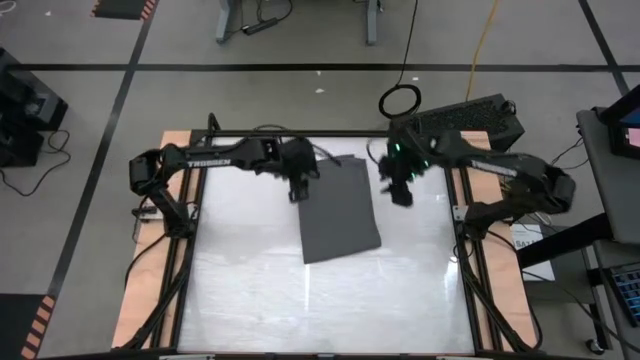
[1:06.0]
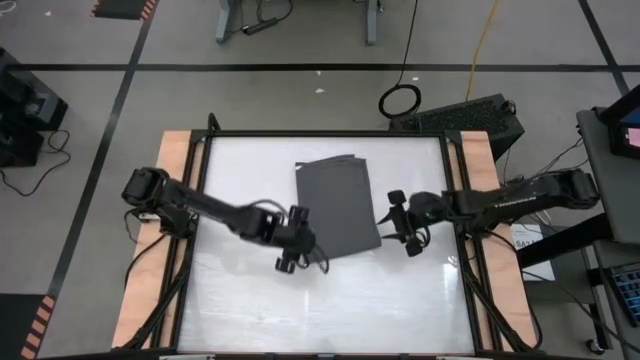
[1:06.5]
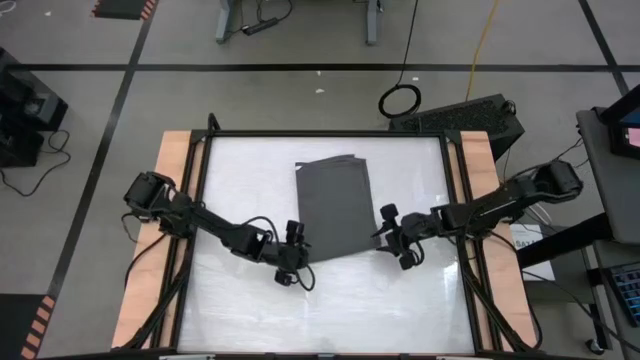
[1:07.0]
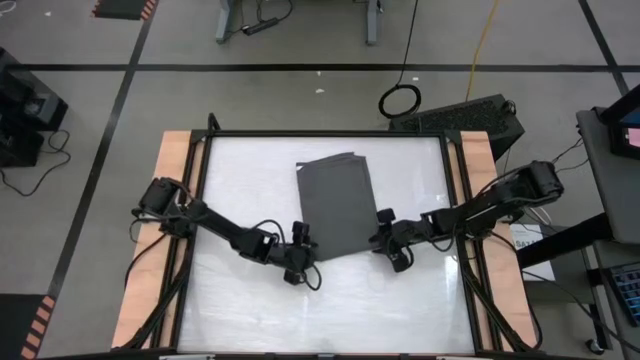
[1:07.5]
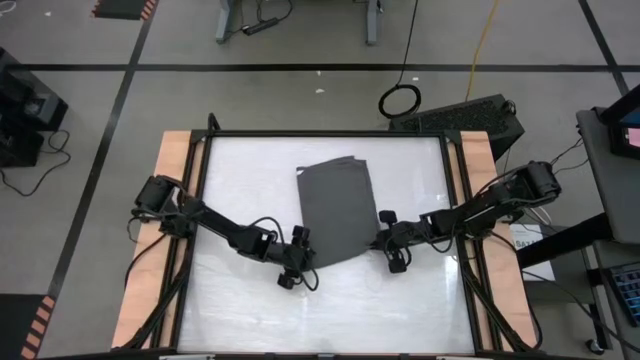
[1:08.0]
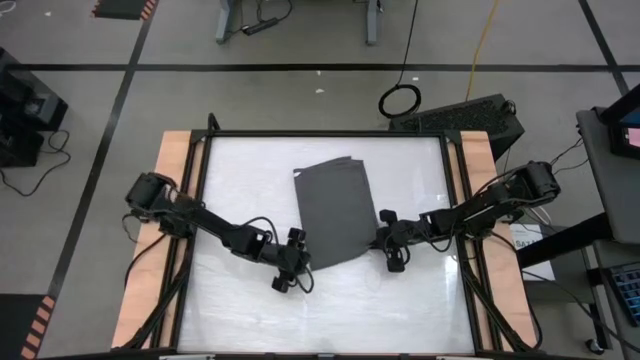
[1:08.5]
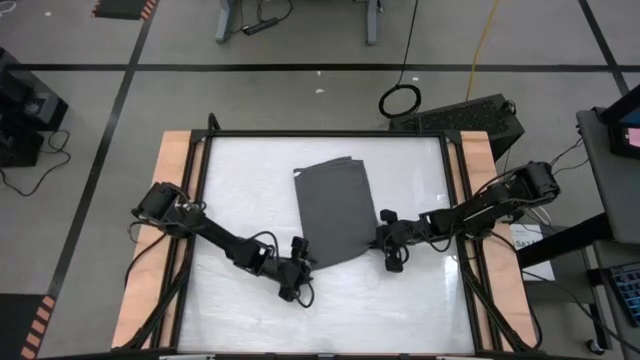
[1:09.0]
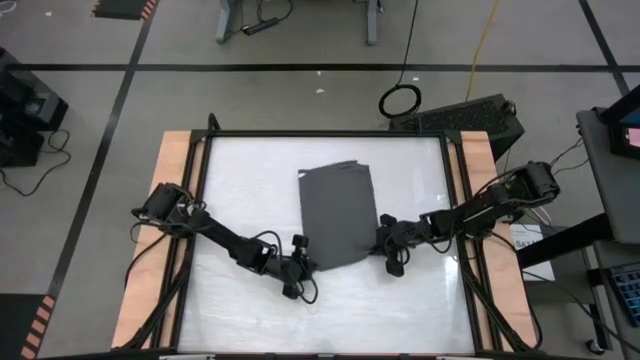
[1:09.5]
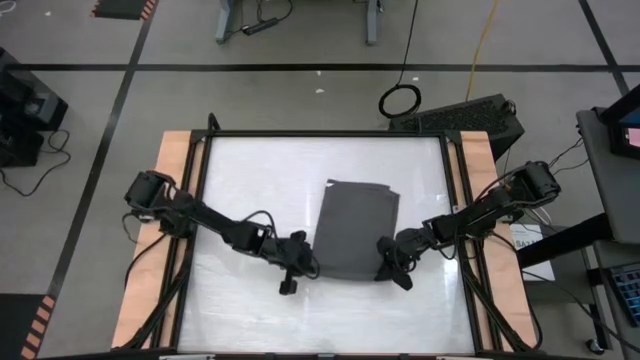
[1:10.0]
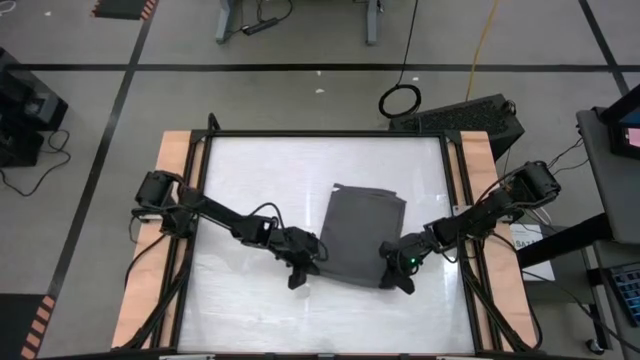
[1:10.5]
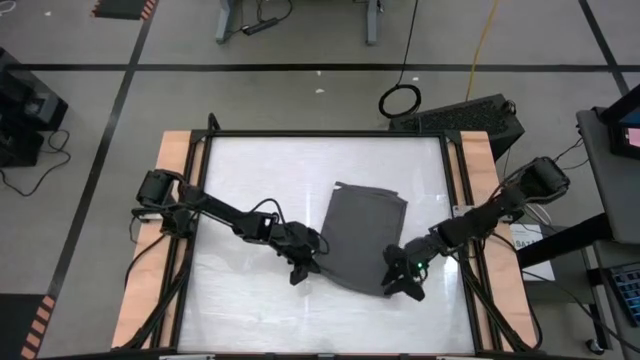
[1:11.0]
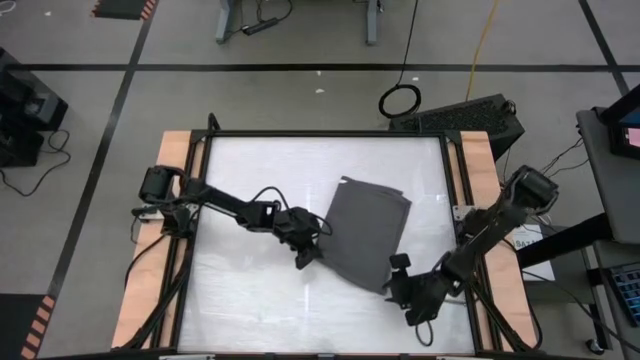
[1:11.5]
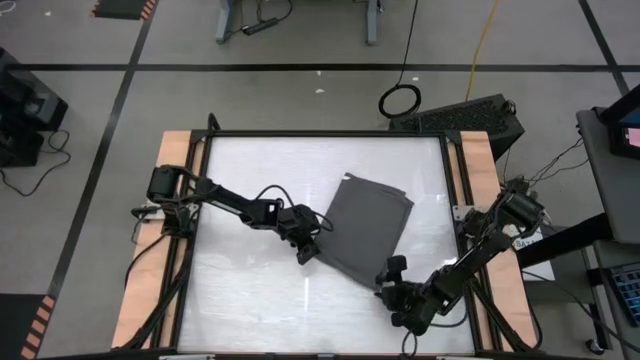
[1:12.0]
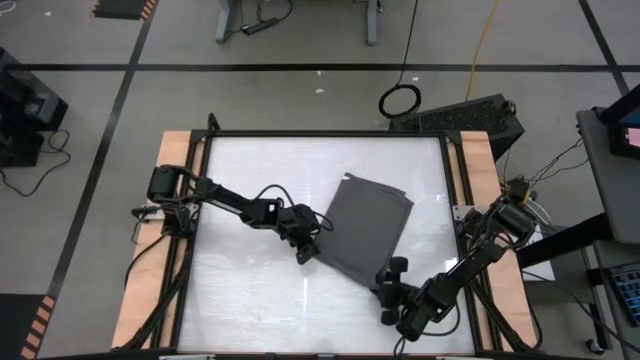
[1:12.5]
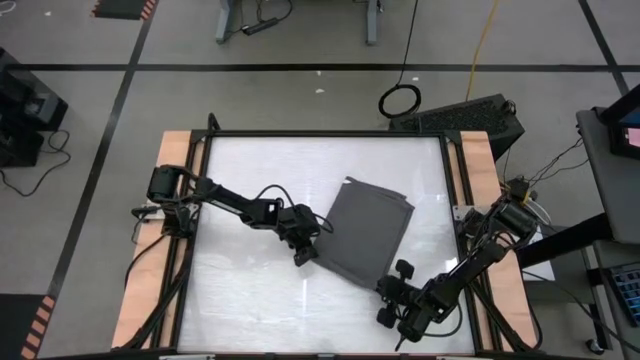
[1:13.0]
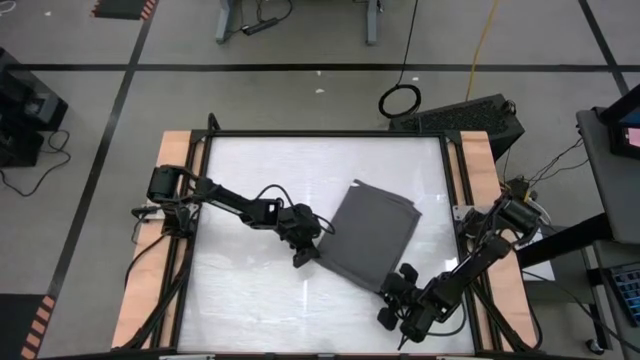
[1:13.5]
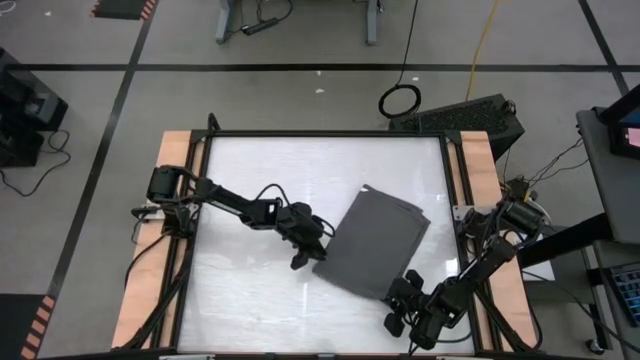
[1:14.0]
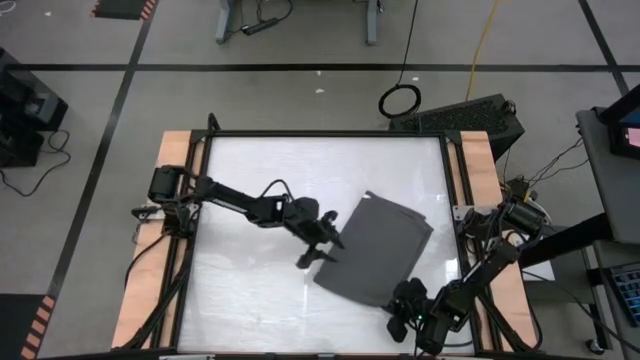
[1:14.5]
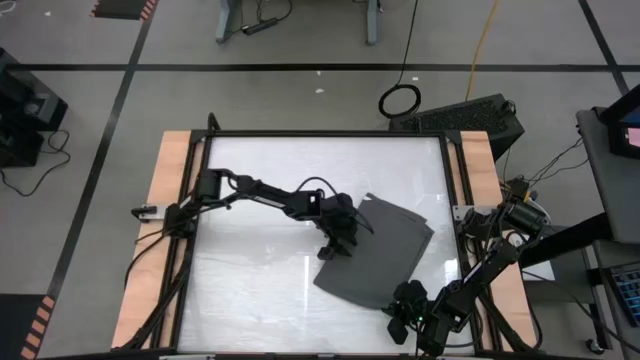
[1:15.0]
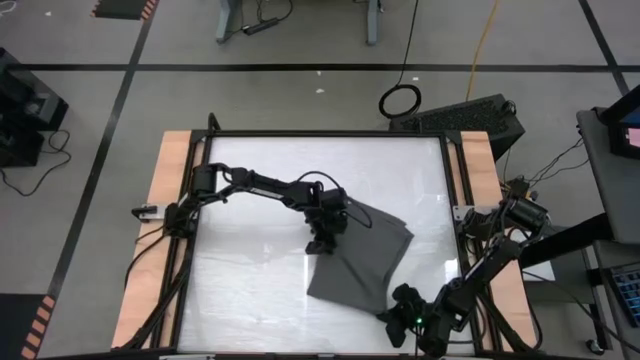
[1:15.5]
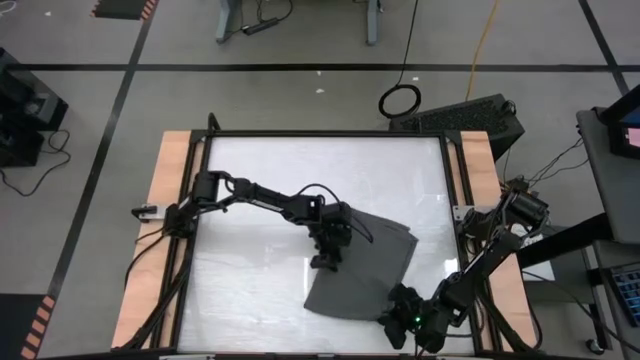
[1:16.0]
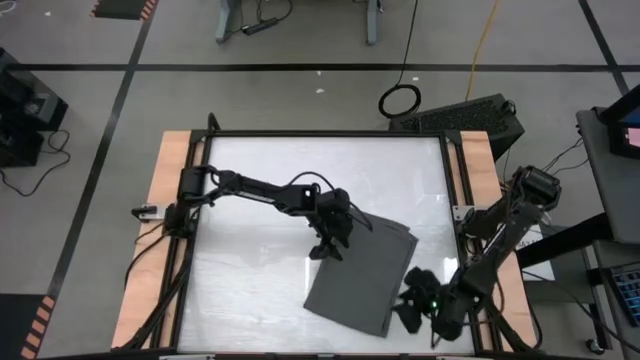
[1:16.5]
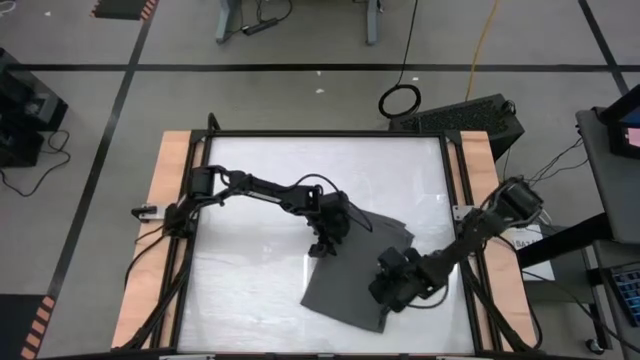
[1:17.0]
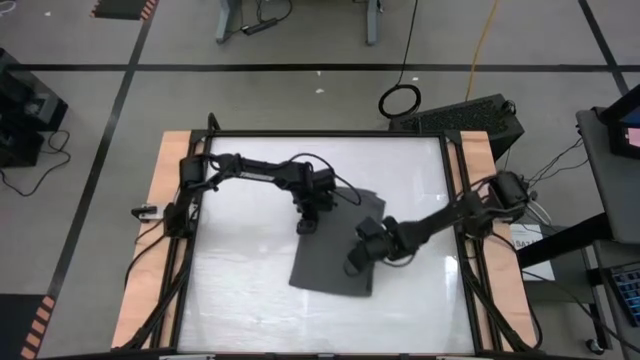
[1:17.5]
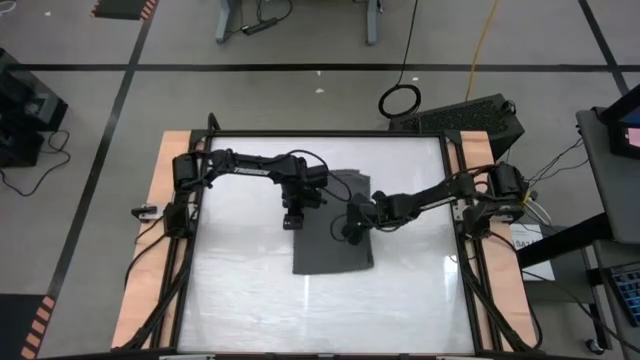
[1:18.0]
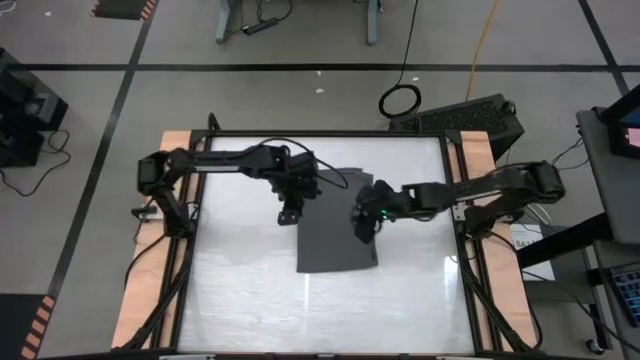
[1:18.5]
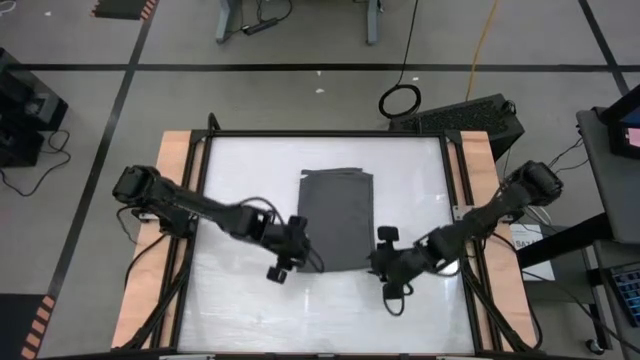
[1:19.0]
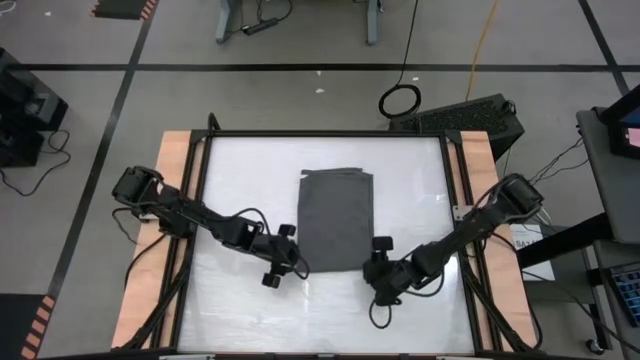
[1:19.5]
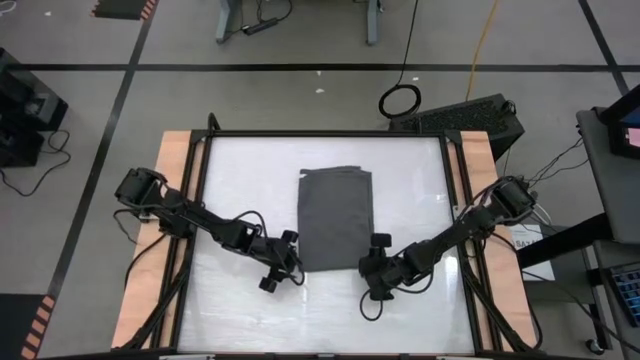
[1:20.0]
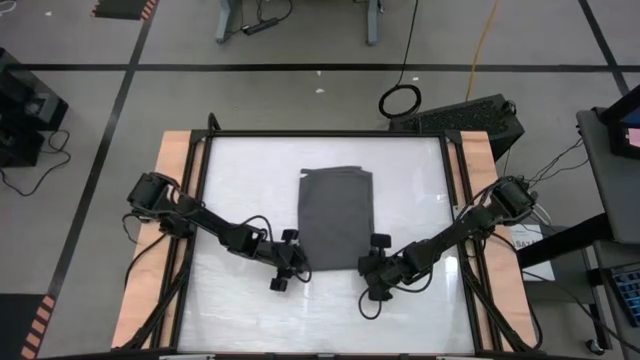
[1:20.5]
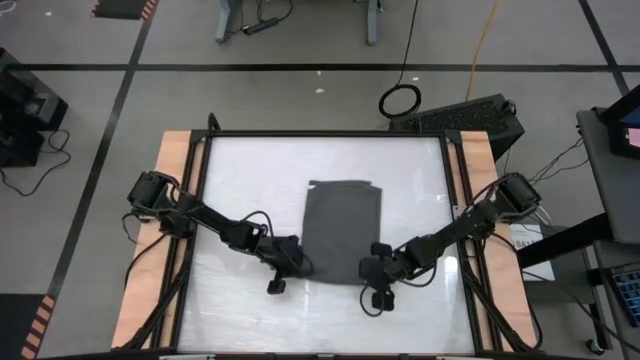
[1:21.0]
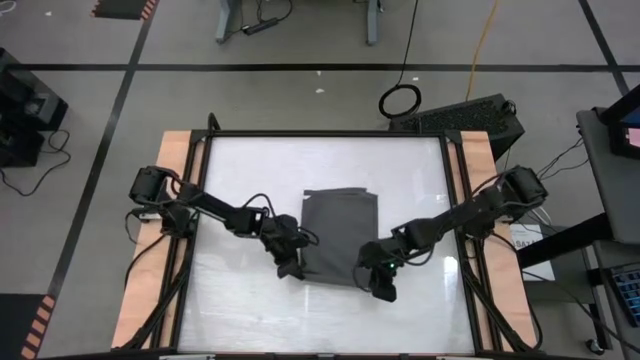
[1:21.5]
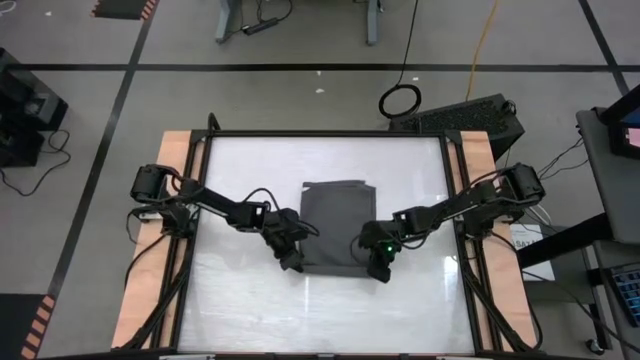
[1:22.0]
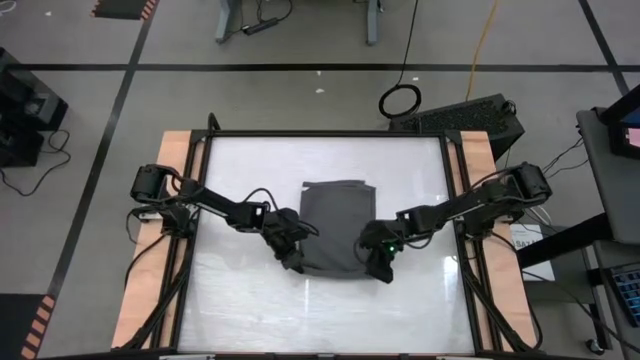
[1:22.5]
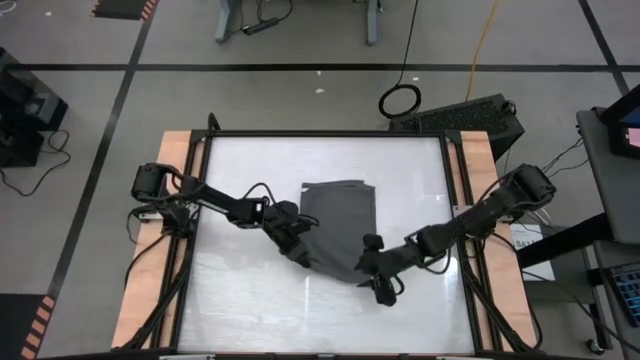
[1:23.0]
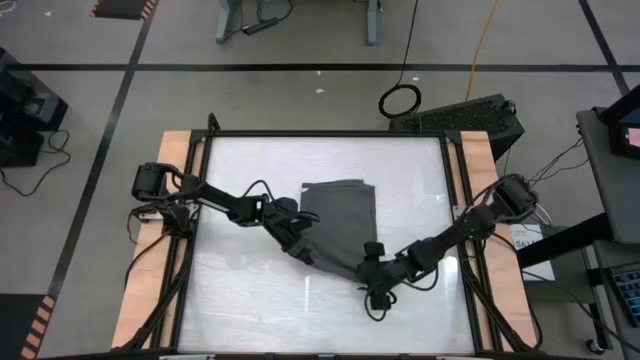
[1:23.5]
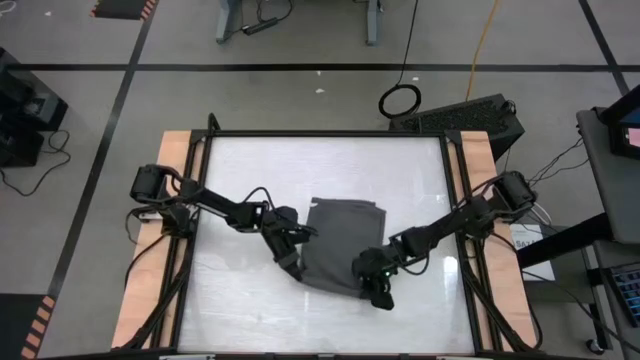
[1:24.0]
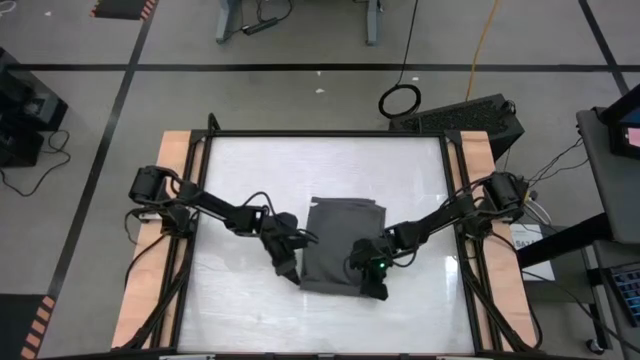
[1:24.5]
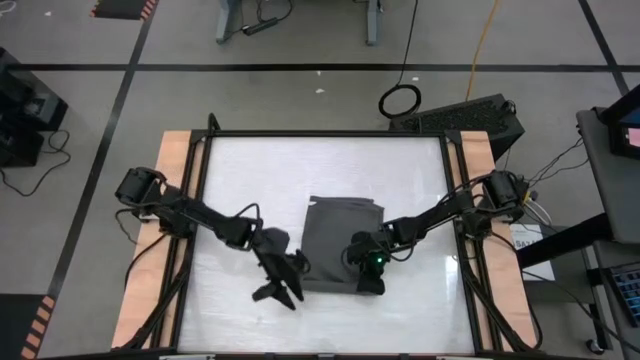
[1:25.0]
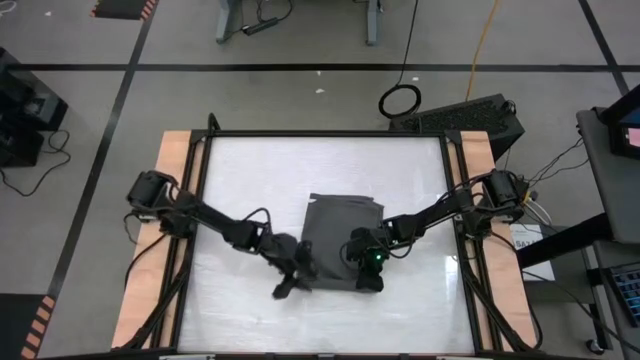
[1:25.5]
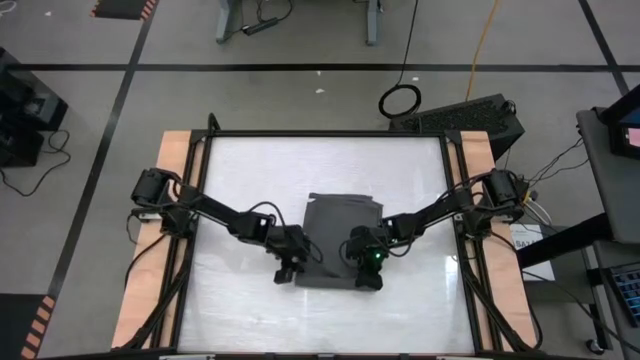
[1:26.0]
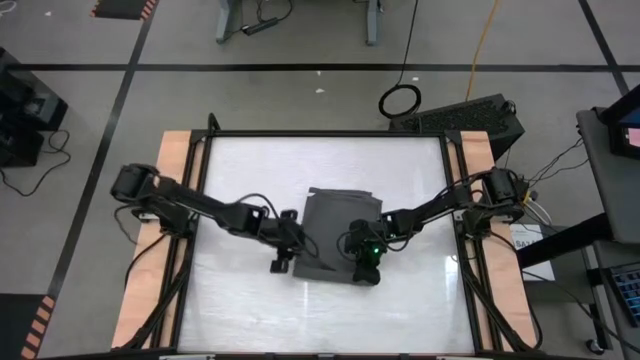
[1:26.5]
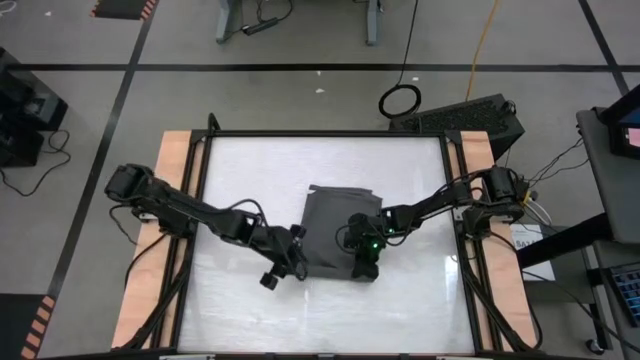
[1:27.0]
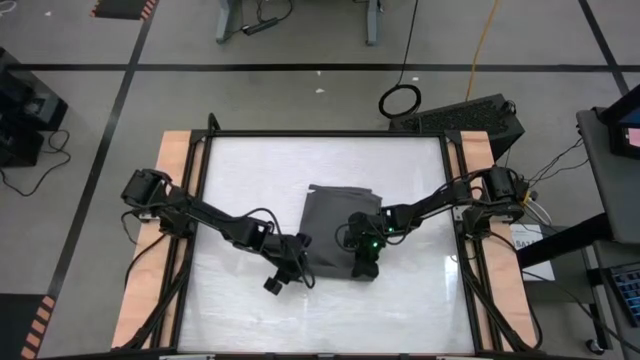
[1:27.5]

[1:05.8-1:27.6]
Task: Roll towel
Roll the dark gray towel
